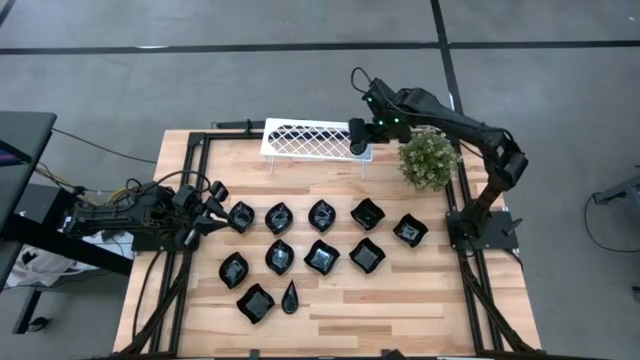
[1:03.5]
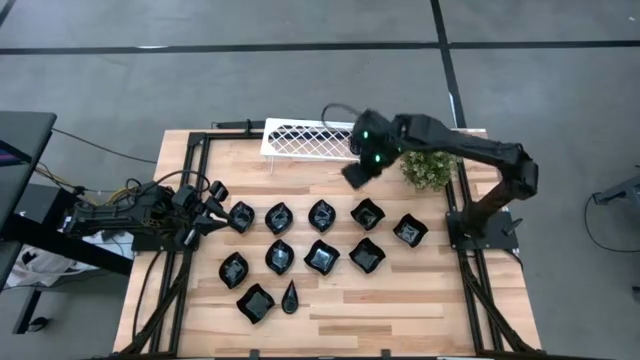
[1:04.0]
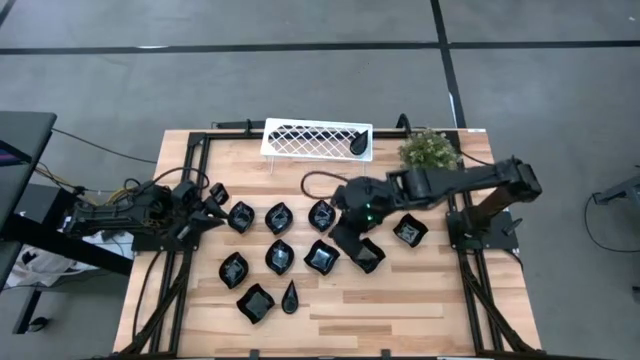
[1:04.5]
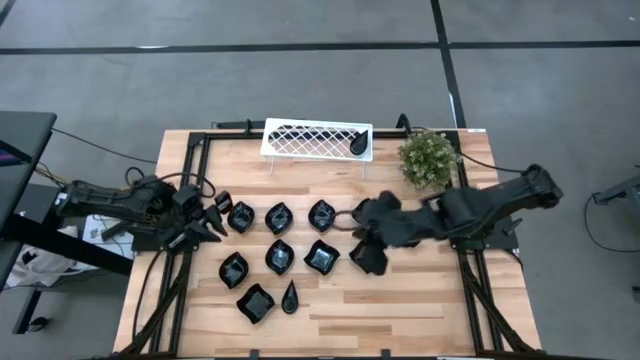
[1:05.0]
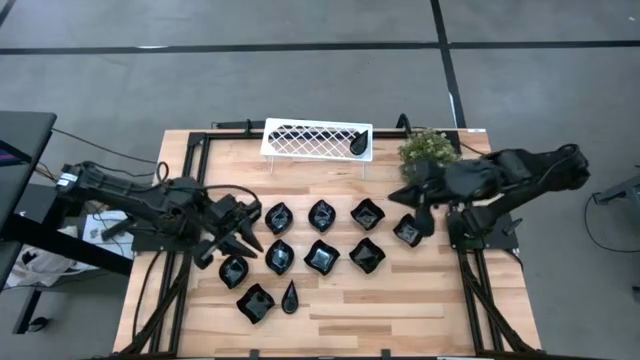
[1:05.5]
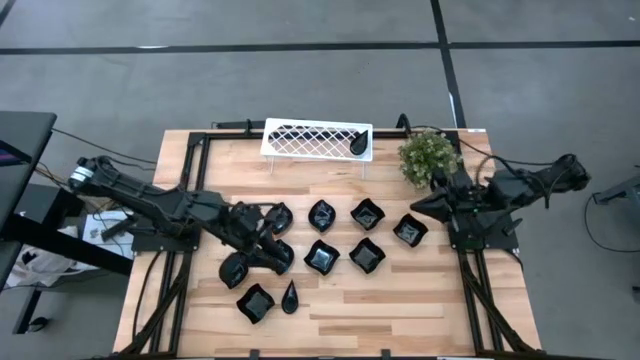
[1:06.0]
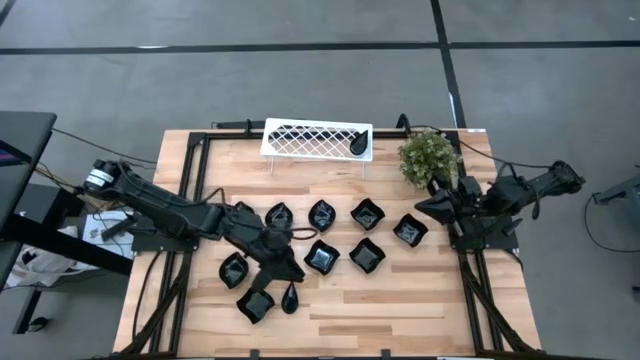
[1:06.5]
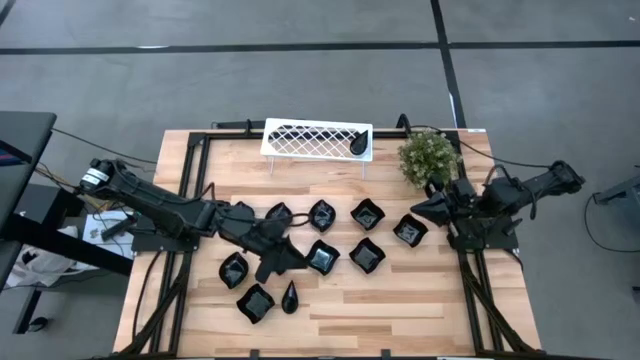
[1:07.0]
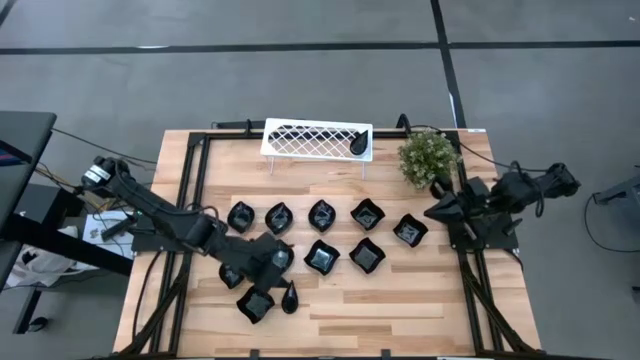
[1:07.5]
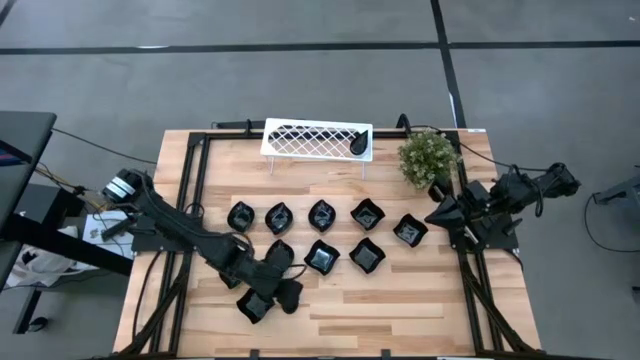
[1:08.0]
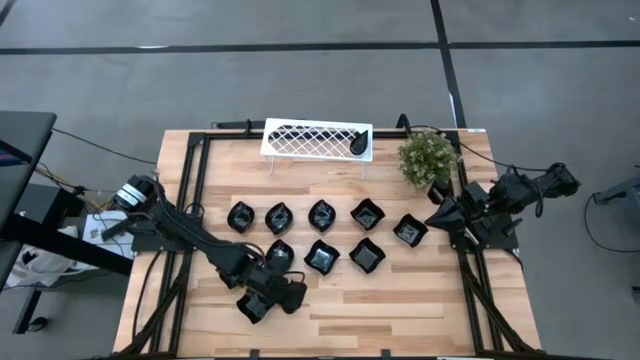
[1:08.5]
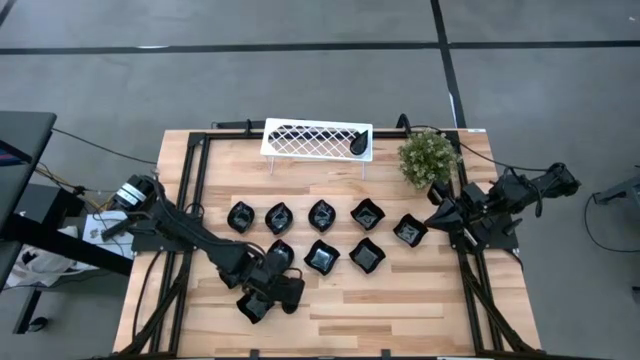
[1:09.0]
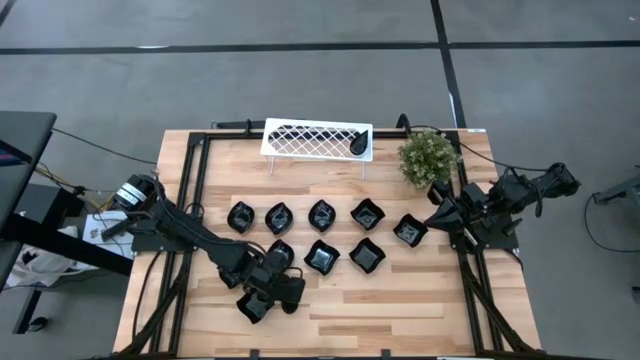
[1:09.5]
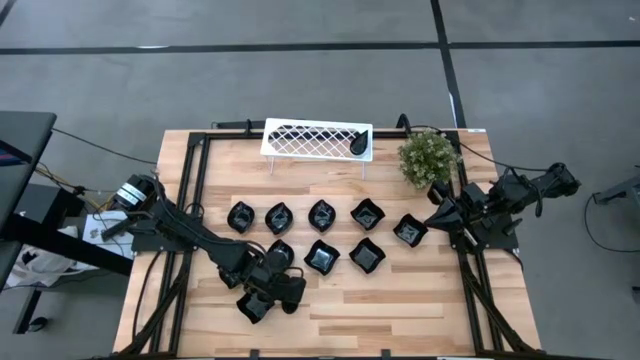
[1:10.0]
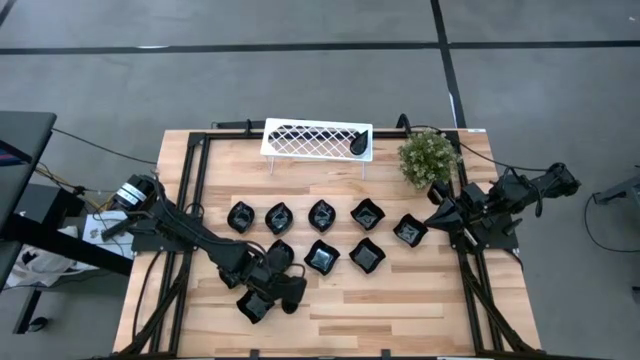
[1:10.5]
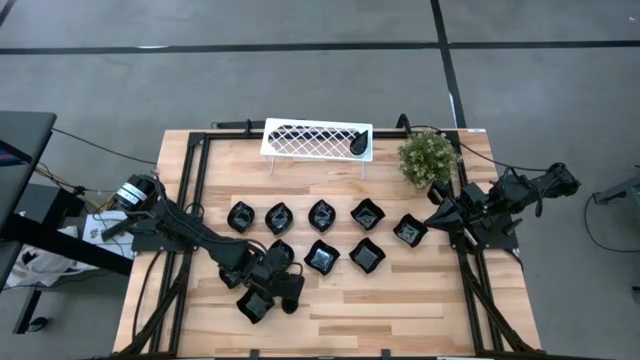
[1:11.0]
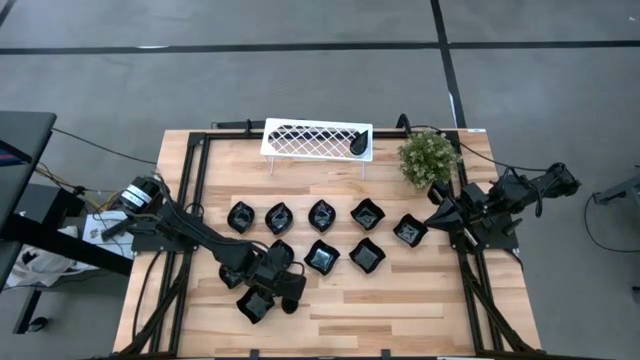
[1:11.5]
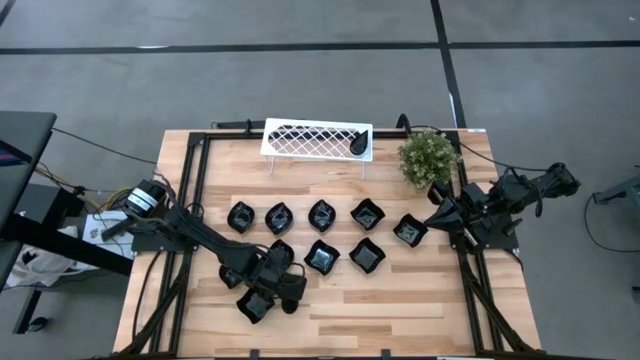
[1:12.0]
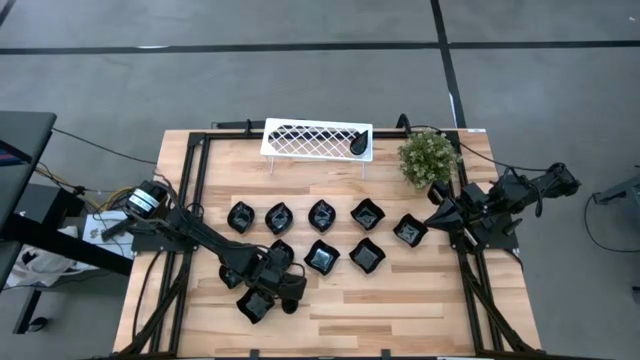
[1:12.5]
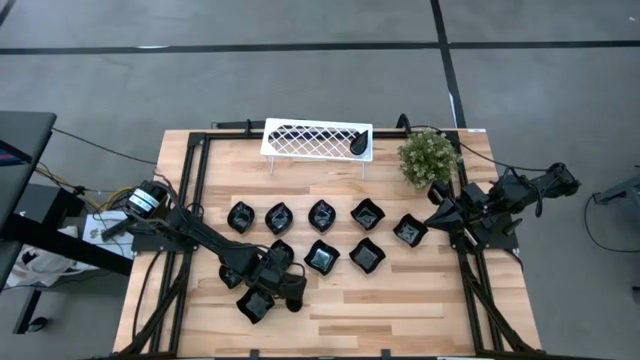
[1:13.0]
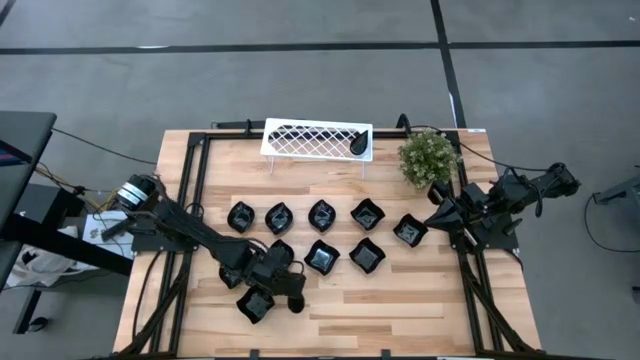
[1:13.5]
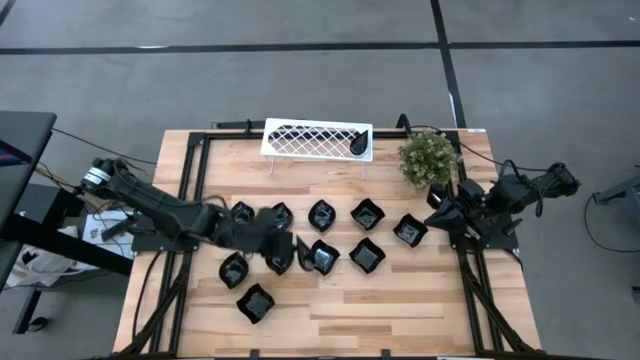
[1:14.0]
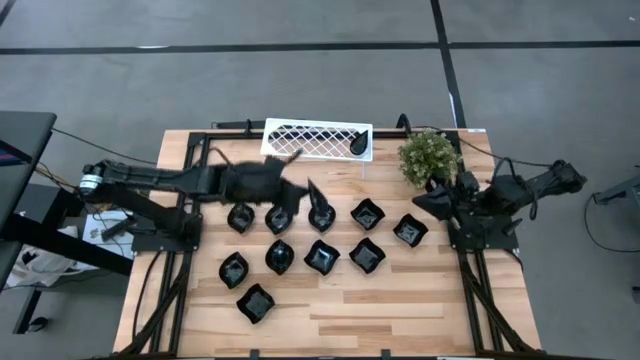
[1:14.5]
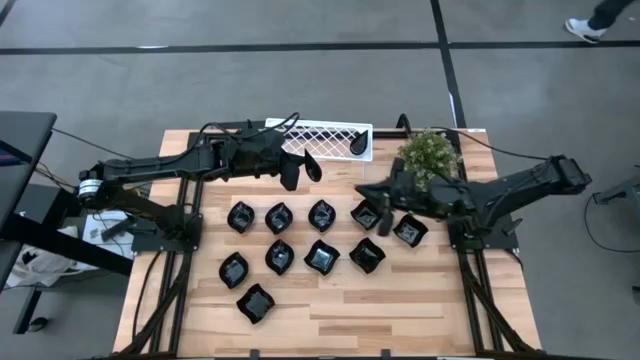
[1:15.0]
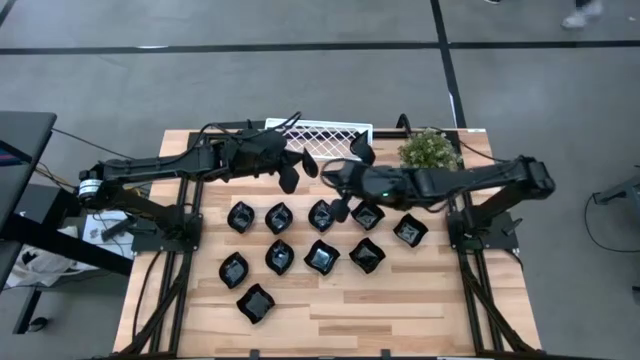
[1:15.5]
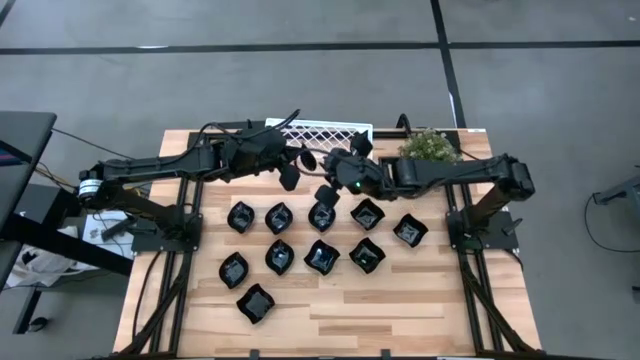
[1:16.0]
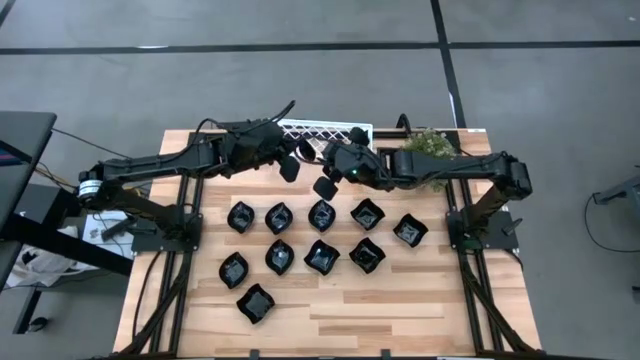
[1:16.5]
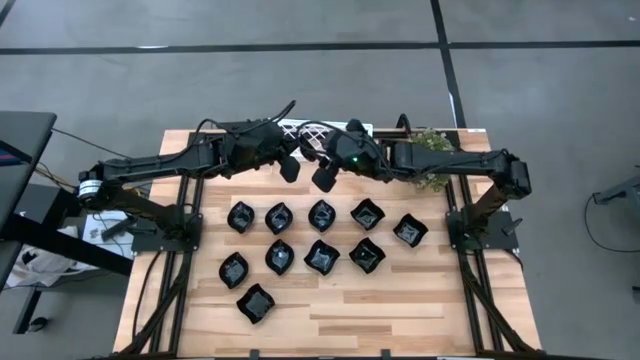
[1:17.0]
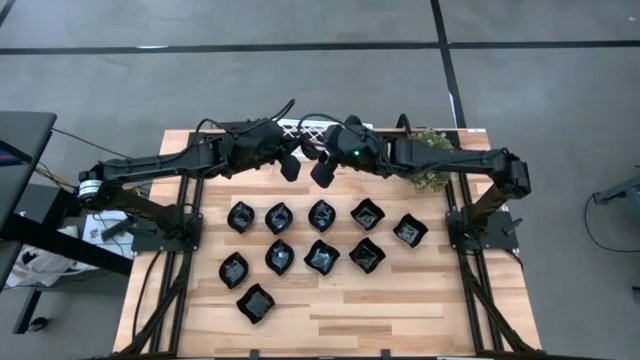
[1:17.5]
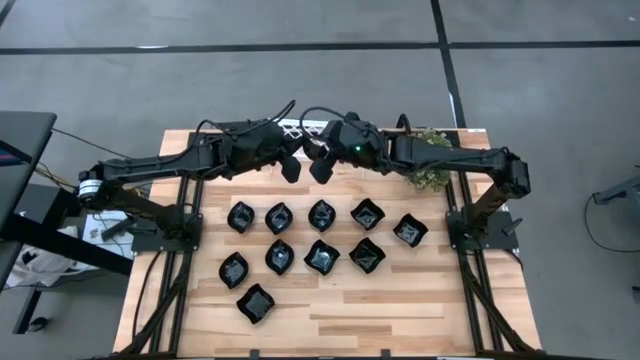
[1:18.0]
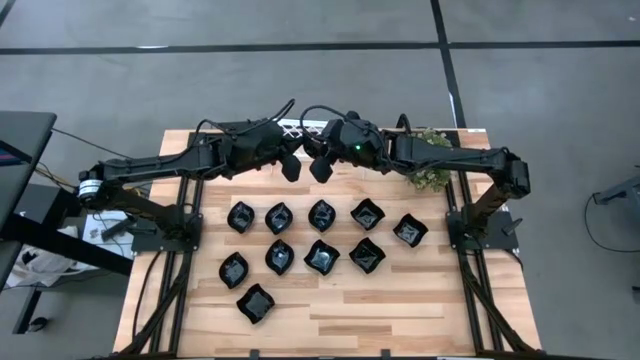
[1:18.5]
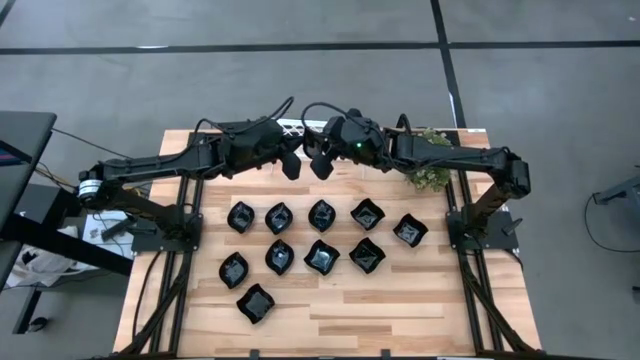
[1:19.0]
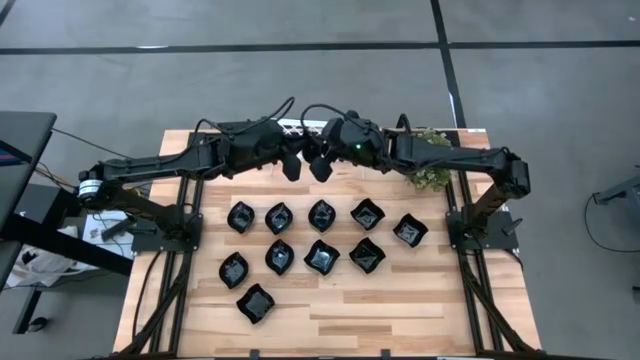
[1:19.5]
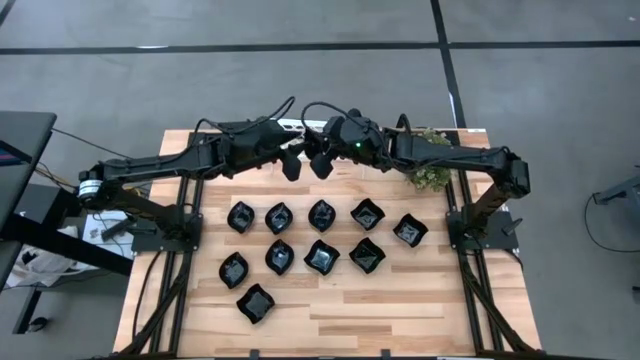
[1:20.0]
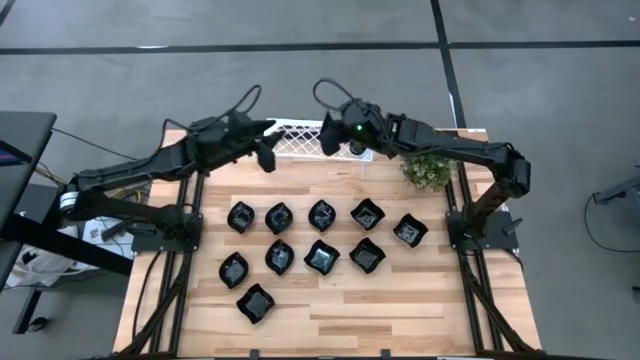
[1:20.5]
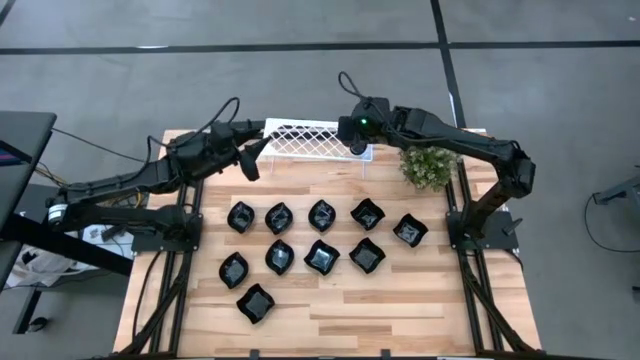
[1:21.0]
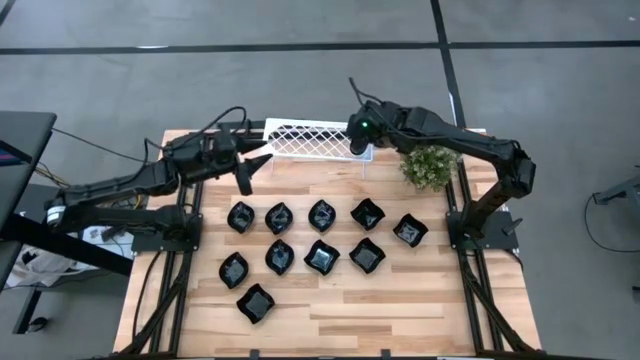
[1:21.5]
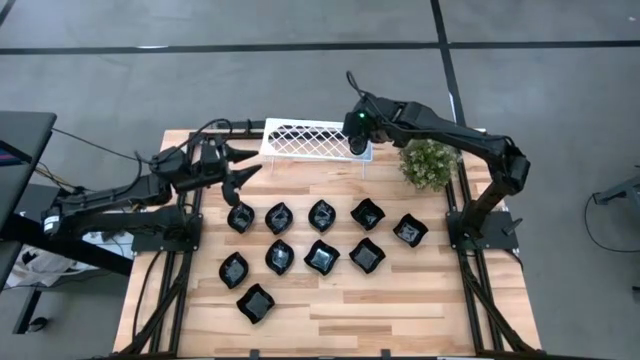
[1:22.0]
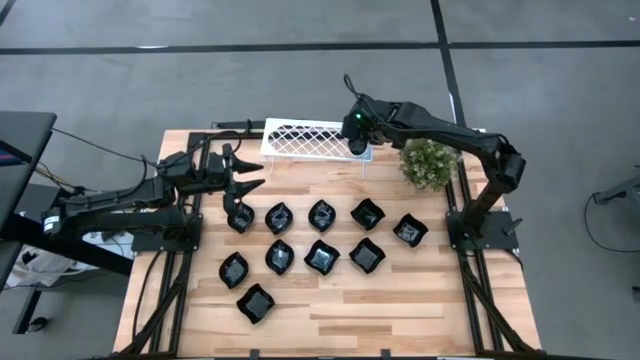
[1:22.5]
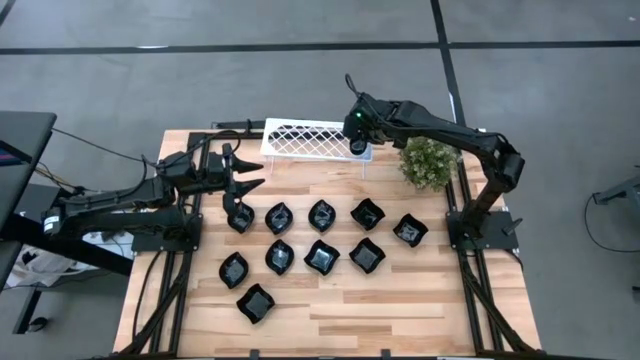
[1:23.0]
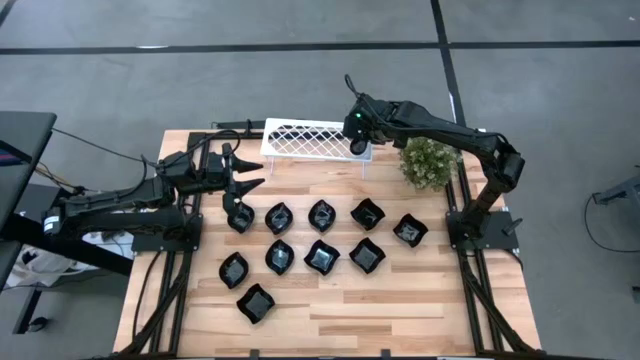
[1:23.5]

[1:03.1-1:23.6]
Task: Pick & Place Mini shaped plates
Stack the black drop shaped plate on top of the black drop shaped plate on the shelf

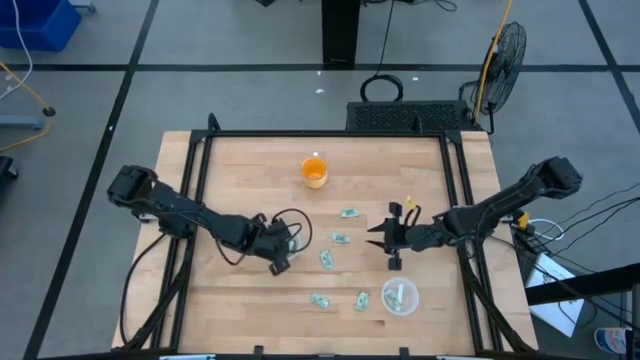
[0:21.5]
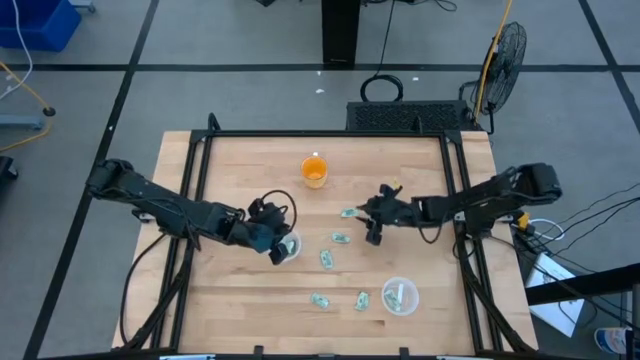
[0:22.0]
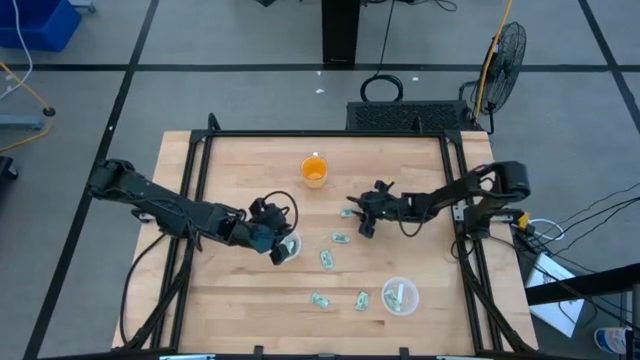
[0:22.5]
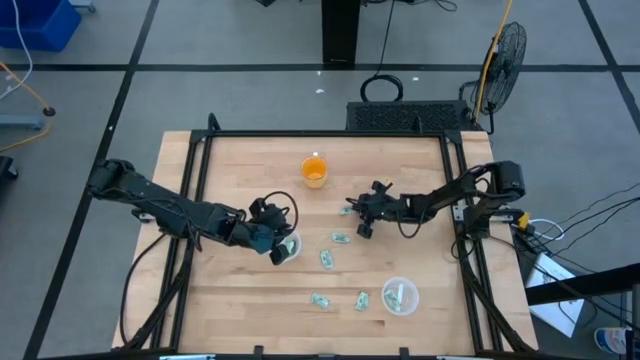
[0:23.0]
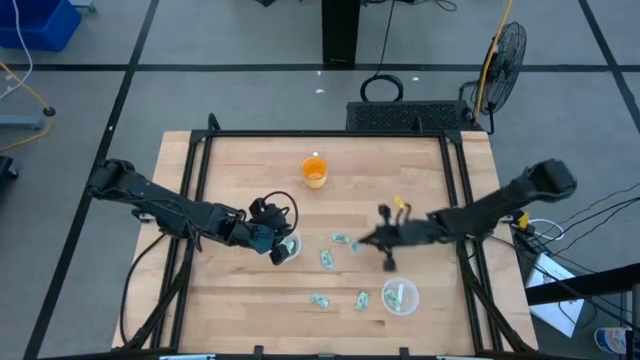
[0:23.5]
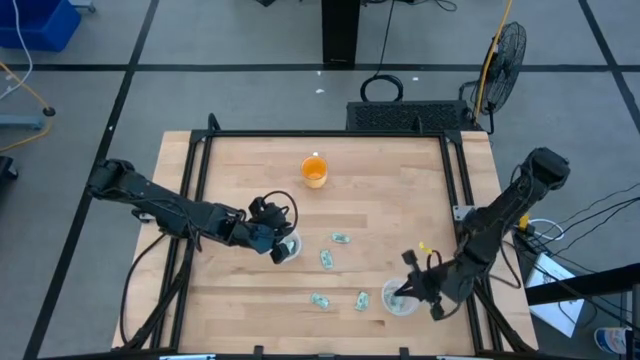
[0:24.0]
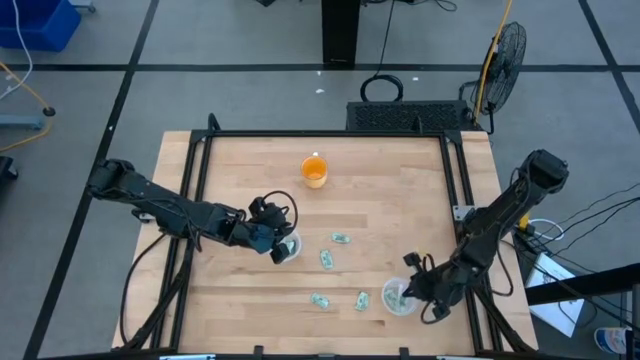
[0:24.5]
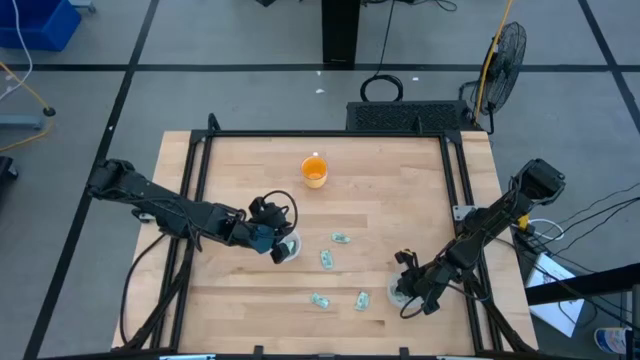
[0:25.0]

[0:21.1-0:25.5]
Task: Pick and place Stevia / Truvia into bins
Put the white stevia packet into the bottom transparent container
